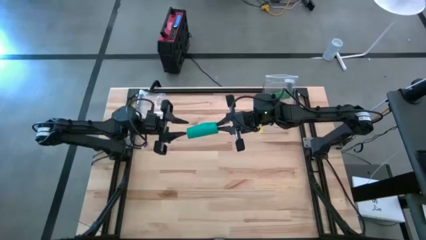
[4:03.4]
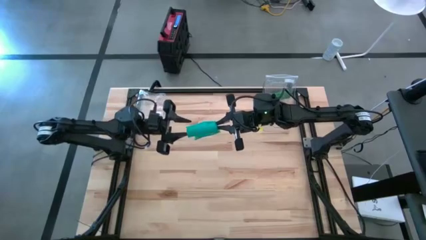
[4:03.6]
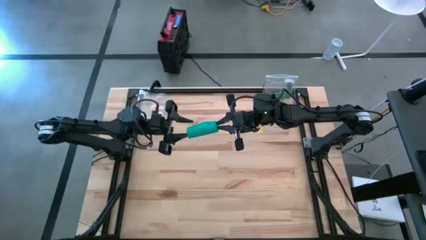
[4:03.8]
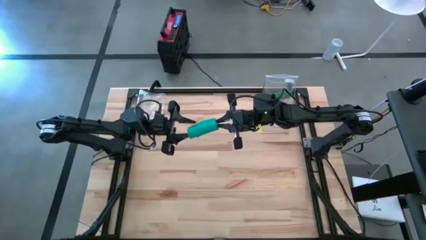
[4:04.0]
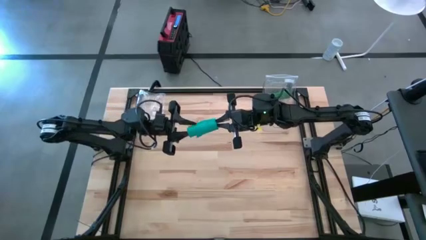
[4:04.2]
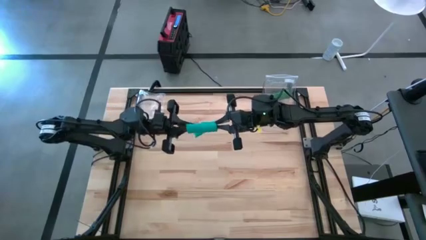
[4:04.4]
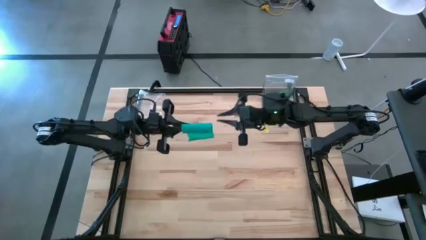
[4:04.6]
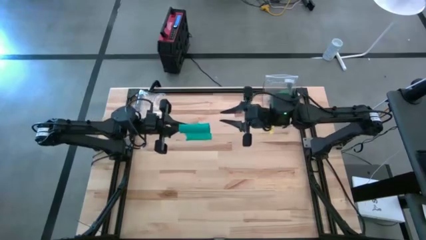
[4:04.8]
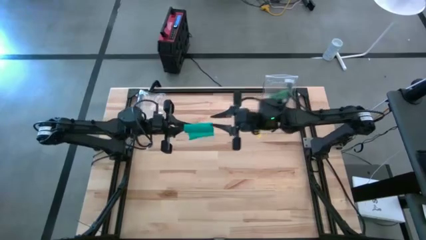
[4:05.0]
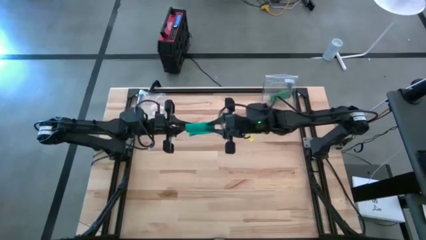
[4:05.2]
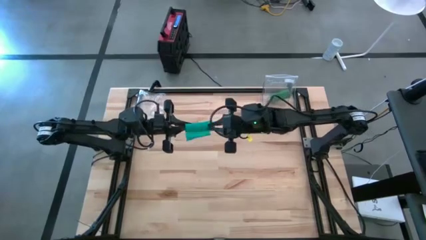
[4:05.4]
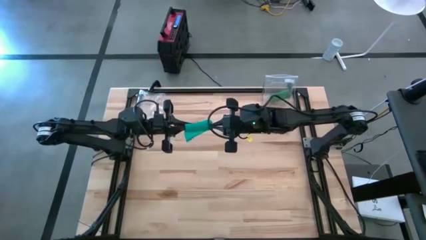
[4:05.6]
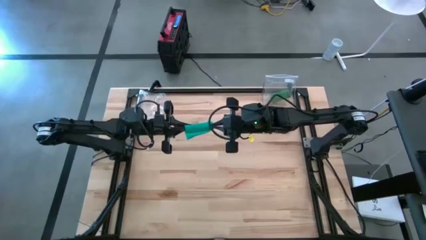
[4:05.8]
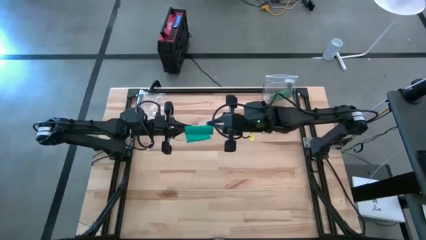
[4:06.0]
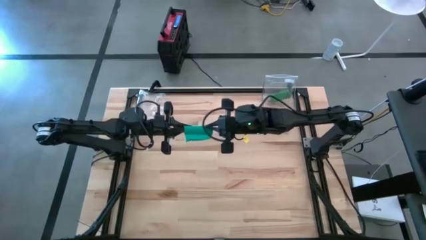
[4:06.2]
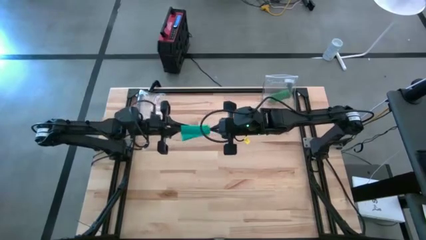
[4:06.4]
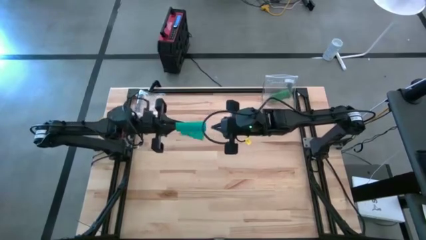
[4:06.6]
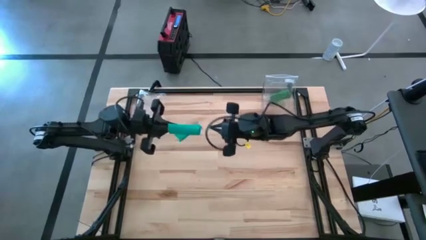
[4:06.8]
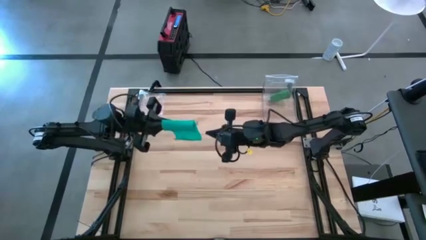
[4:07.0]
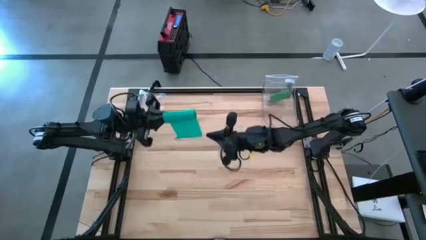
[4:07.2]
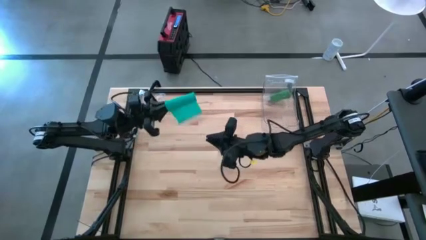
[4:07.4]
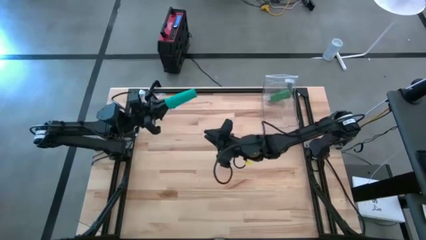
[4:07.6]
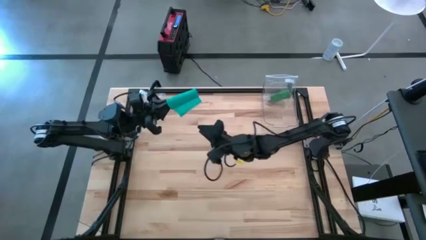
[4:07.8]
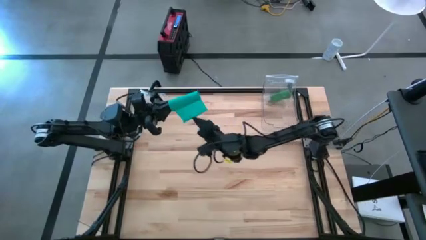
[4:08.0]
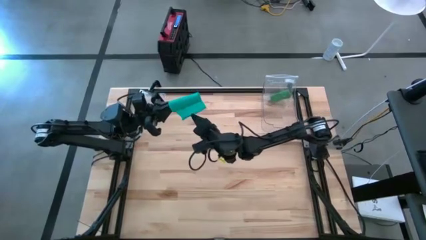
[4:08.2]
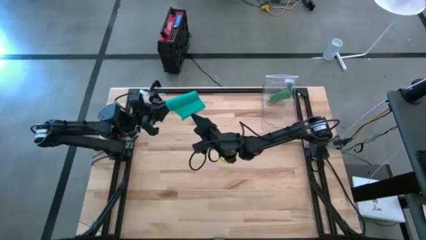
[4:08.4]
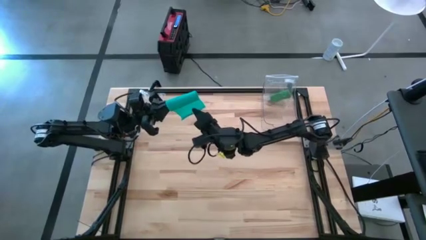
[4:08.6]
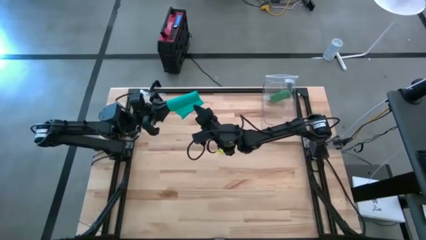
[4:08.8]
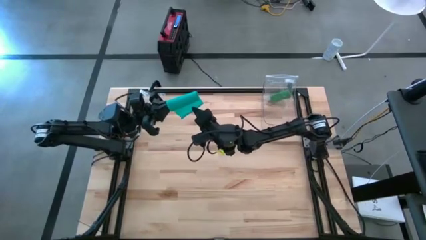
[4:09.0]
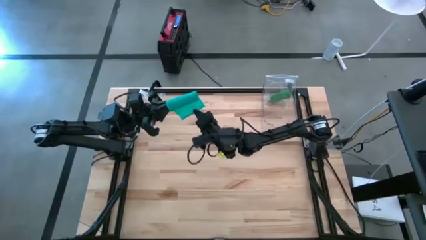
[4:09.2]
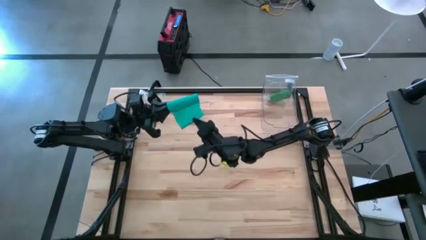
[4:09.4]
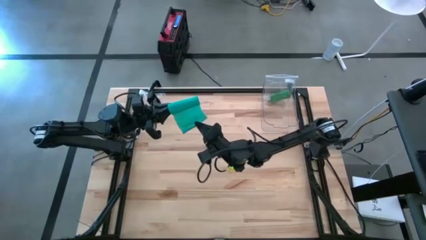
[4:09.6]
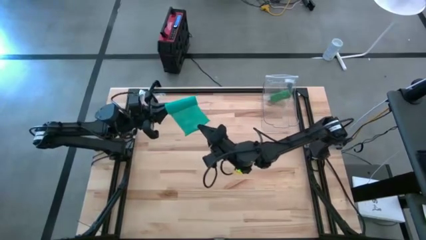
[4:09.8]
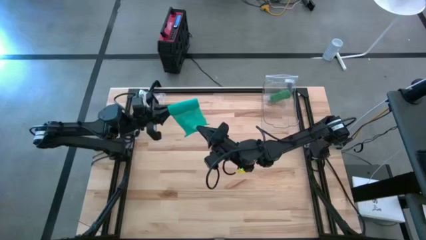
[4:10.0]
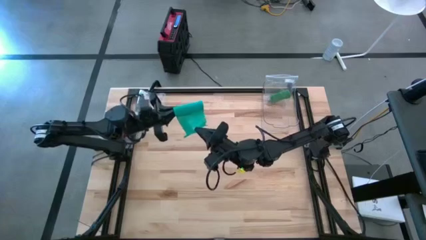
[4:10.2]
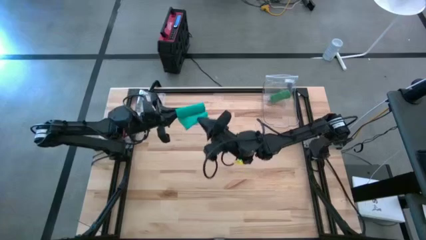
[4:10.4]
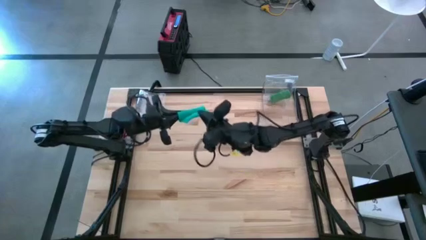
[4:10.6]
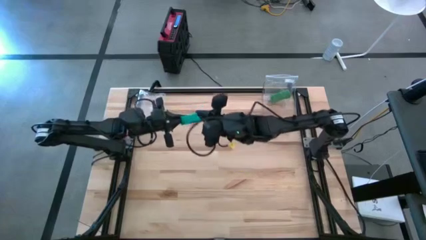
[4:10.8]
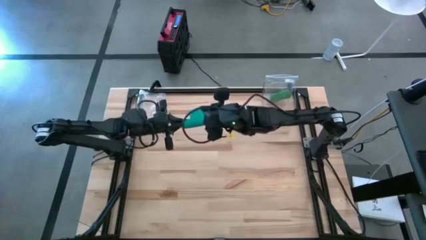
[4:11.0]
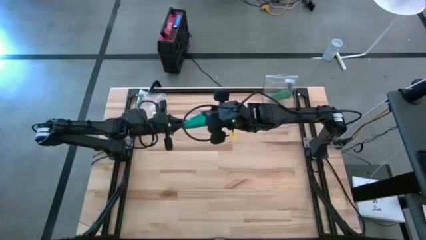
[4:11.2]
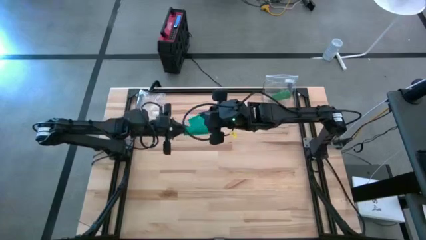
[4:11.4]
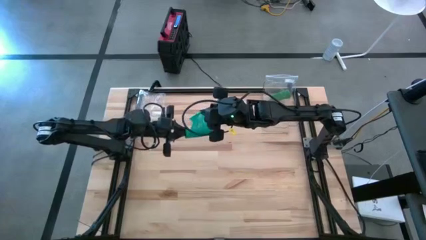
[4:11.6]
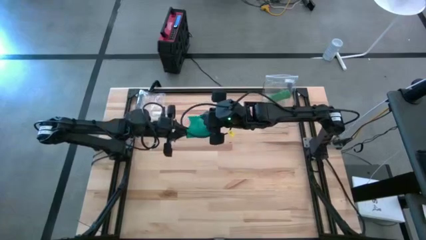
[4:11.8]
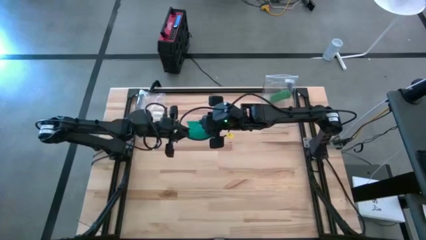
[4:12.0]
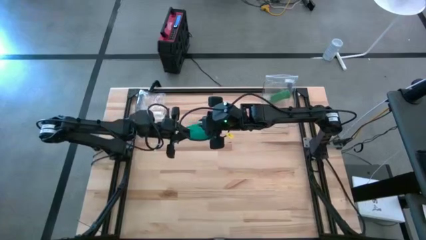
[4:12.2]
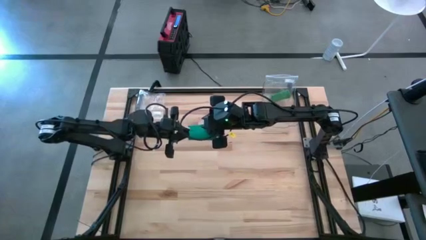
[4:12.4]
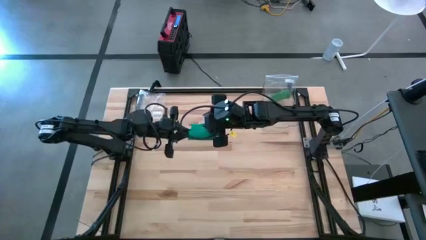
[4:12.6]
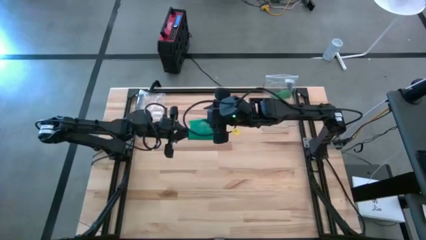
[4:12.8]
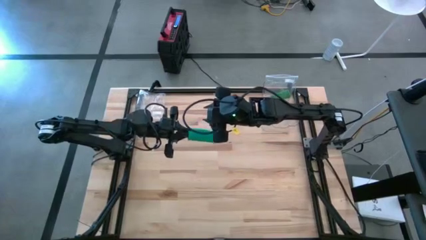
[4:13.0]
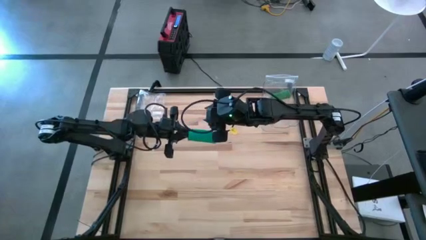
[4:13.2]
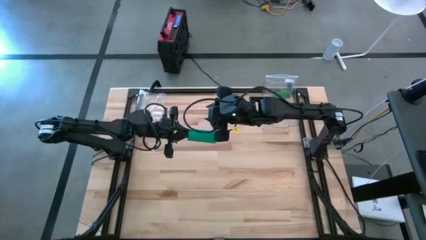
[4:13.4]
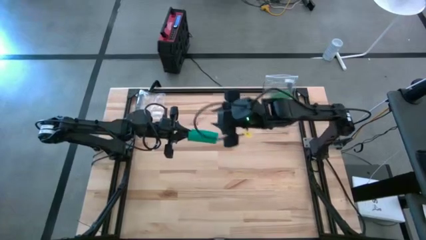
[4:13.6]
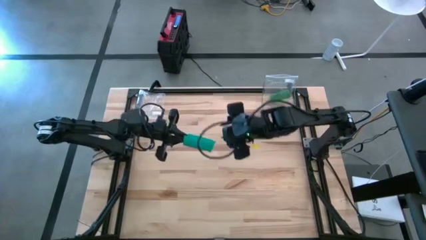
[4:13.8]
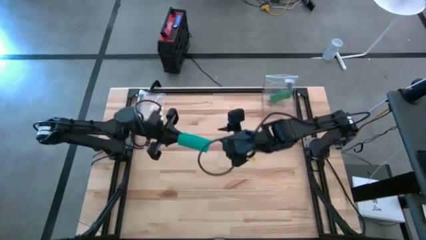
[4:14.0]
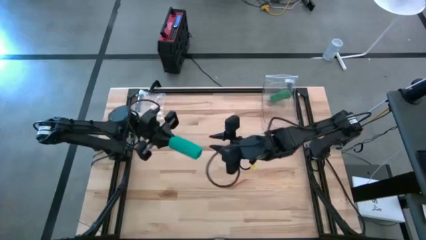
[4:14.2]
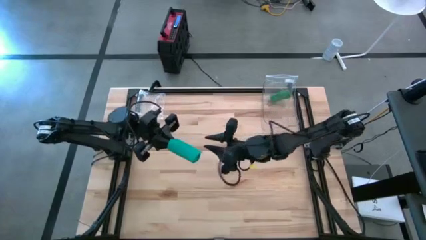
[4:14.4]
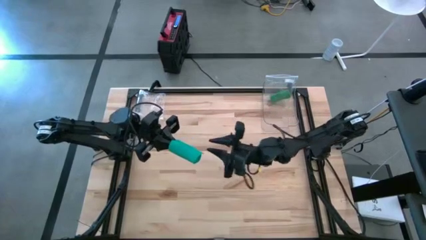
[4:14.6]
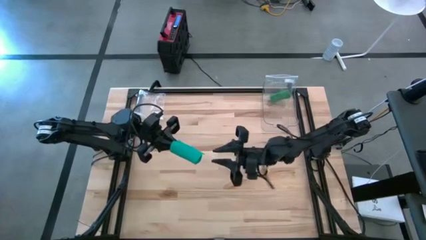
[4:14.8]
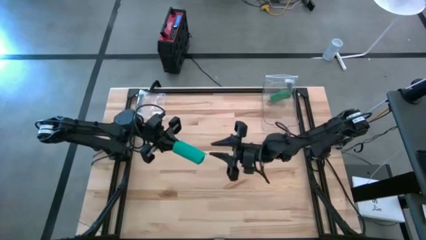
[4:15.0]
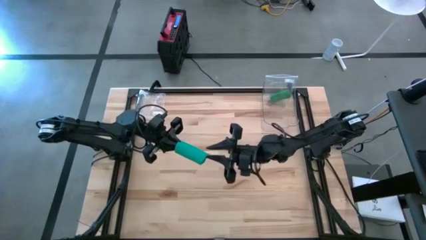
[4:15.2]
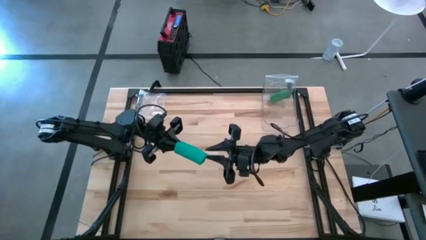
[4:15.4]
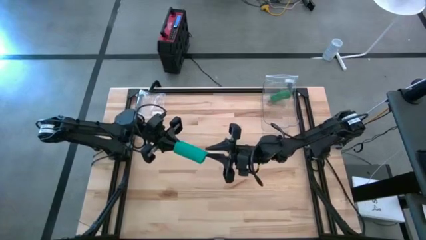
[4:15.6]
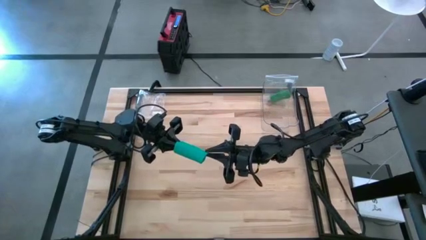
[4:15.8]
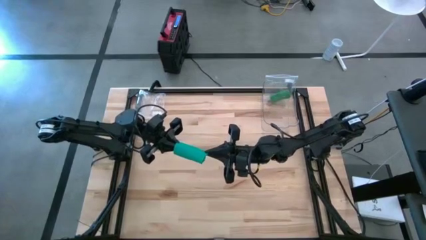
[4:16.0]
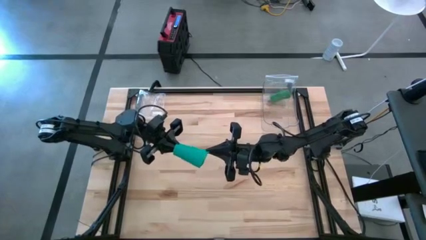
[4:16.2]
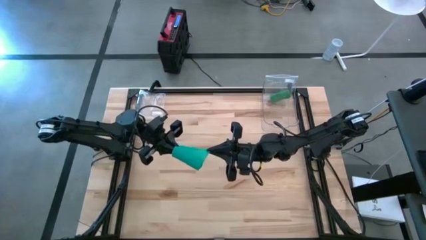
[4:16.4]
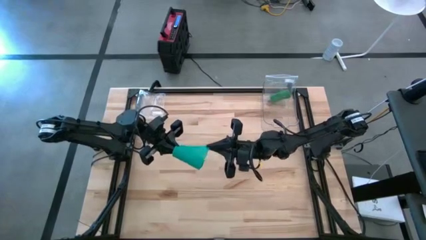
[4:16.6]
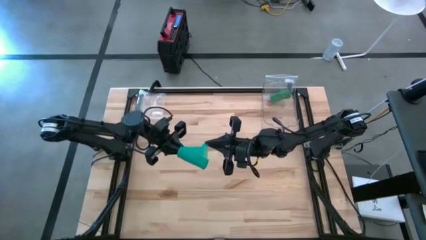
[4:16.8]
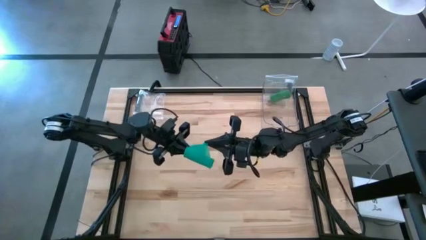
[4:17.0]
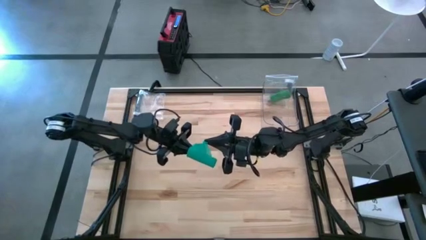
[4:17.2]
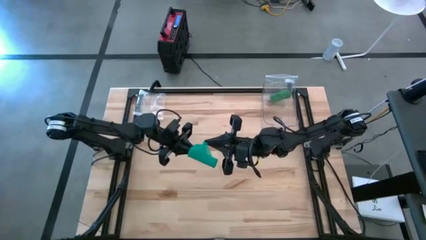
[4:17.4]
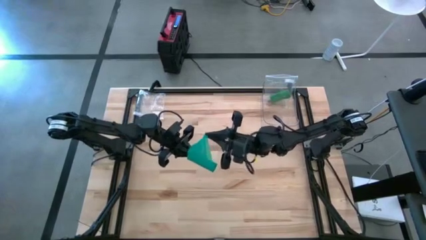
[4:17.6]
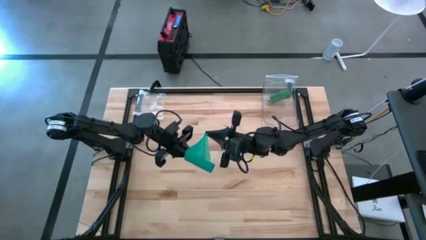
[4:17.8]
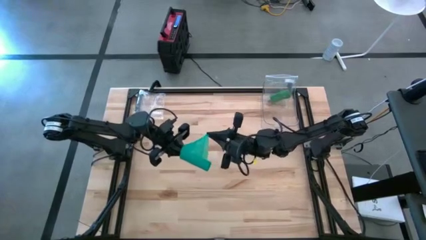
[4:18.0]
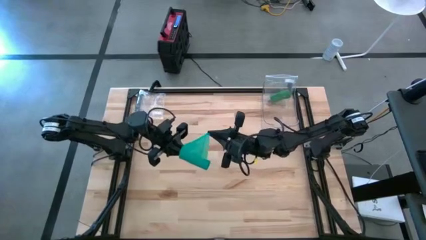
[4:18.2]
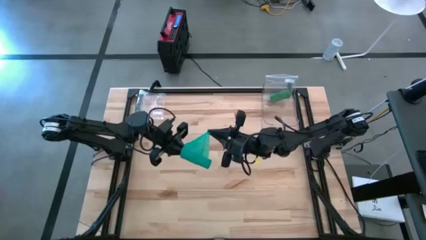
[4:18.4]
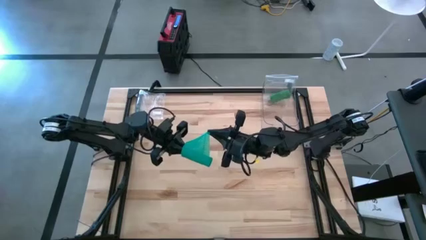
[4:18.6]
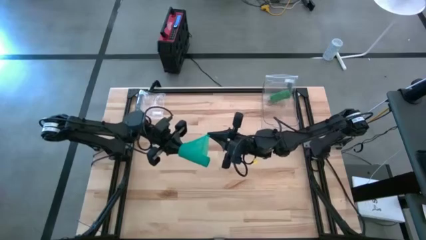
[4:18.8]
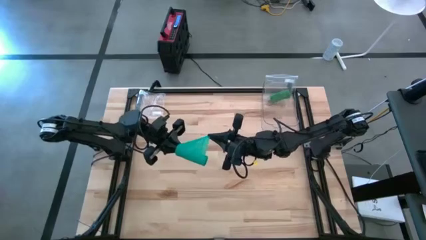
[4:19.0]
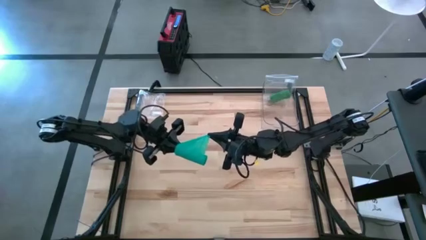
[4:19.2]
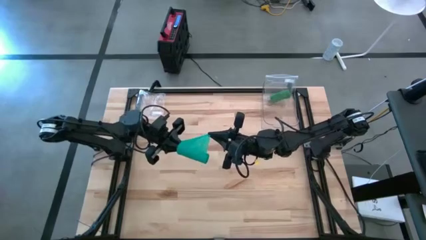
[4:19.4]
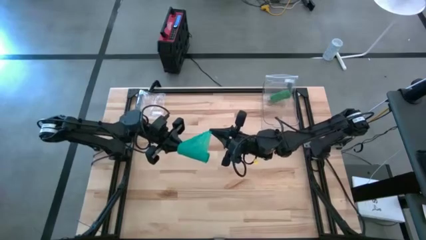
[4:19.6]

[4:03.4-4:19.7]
Task: Roll bandage
Roll the dark green bandage
